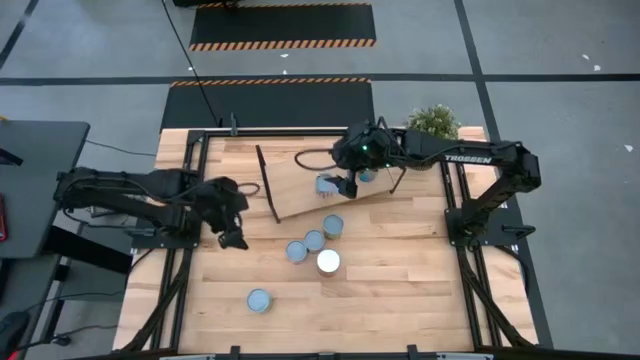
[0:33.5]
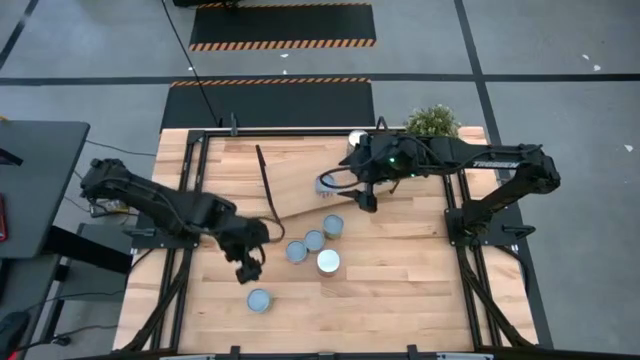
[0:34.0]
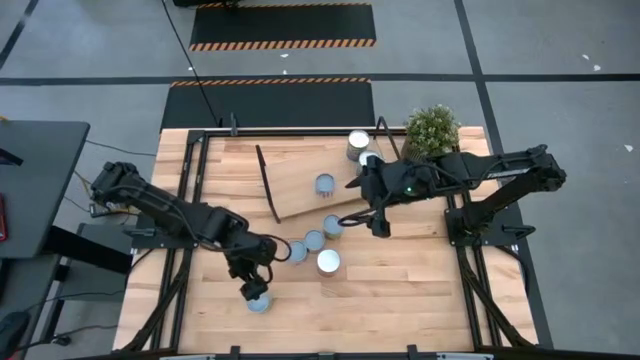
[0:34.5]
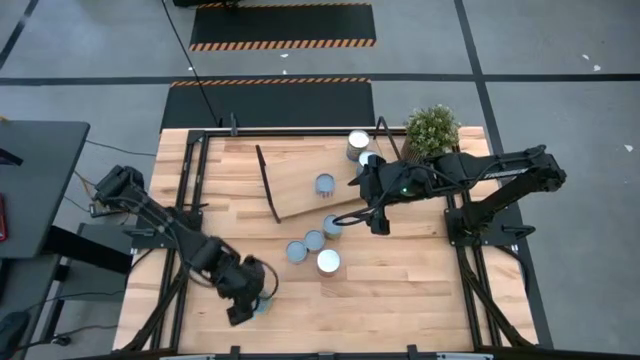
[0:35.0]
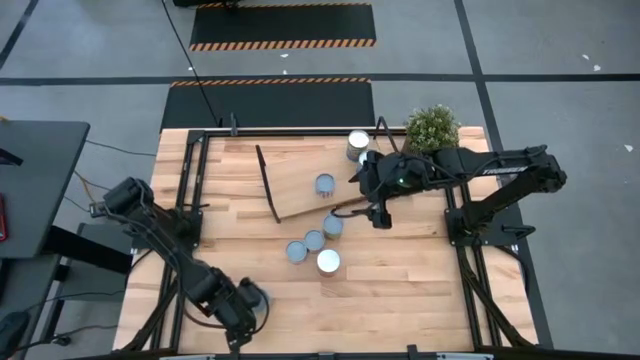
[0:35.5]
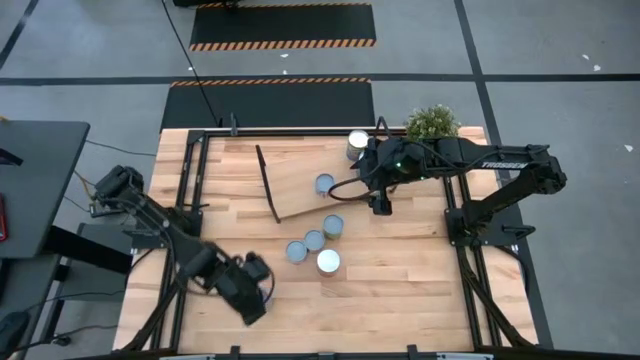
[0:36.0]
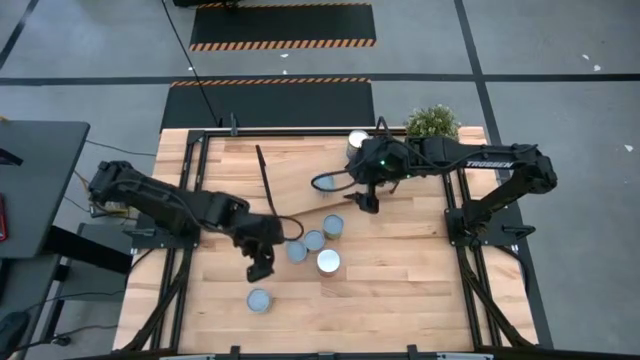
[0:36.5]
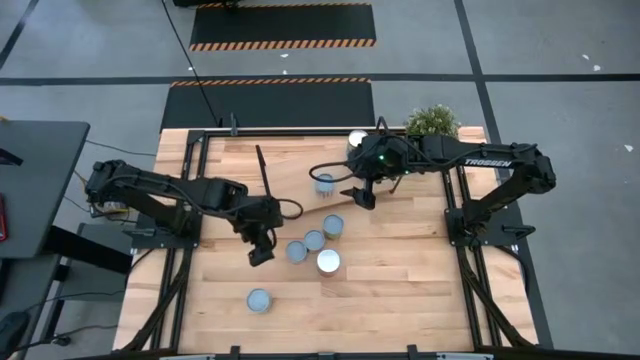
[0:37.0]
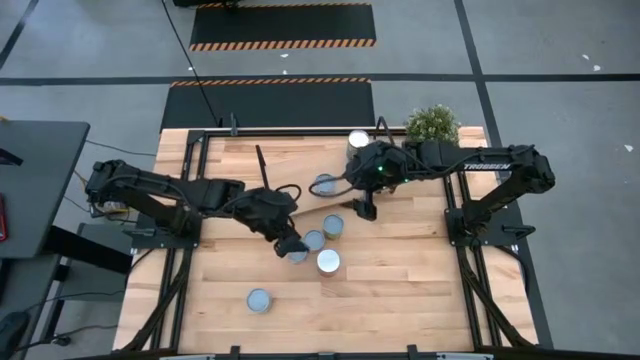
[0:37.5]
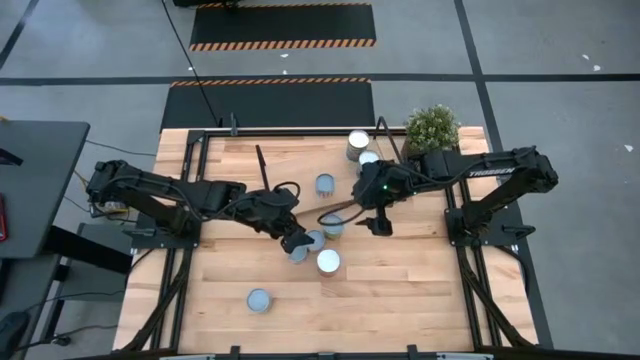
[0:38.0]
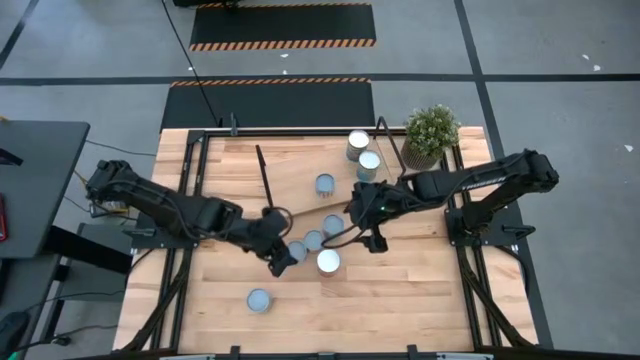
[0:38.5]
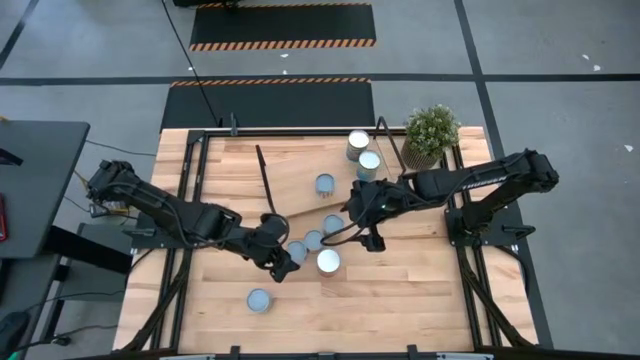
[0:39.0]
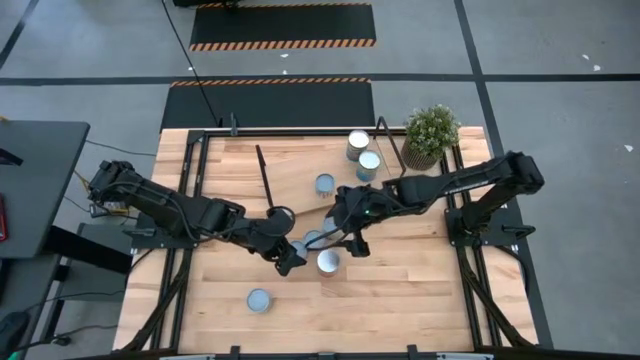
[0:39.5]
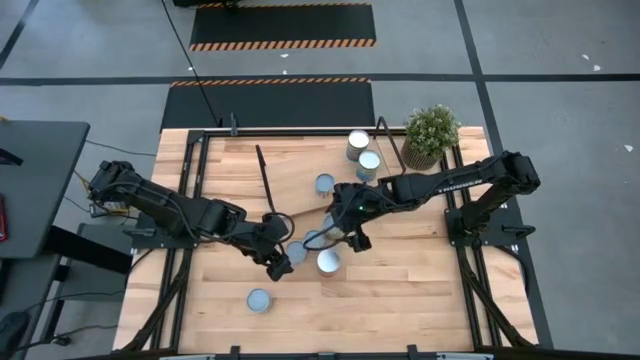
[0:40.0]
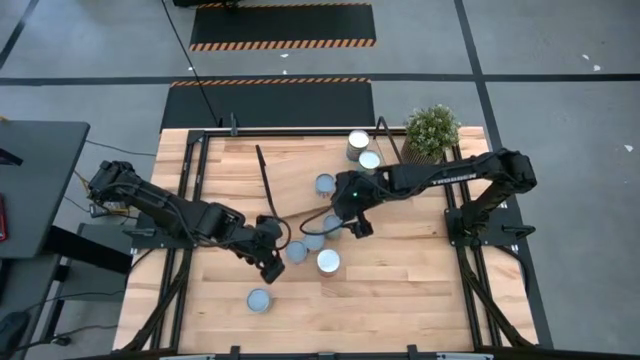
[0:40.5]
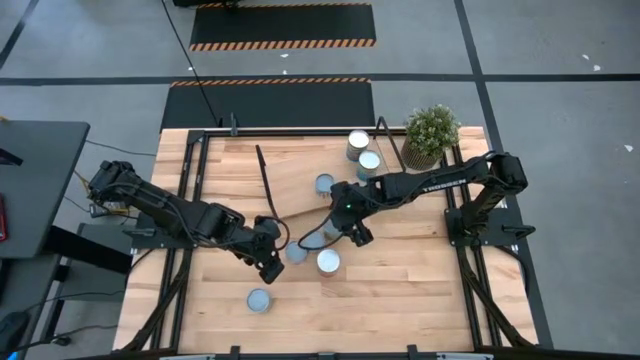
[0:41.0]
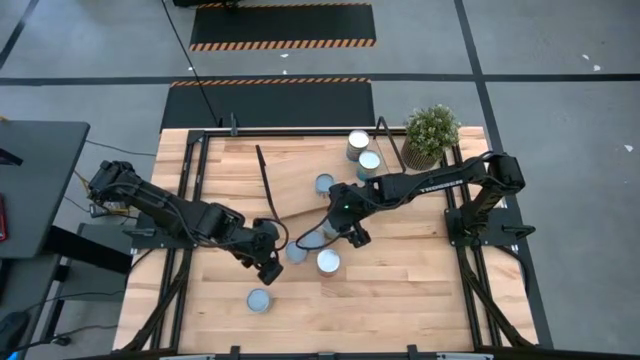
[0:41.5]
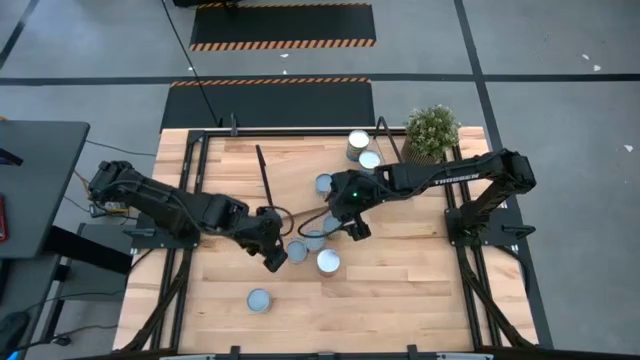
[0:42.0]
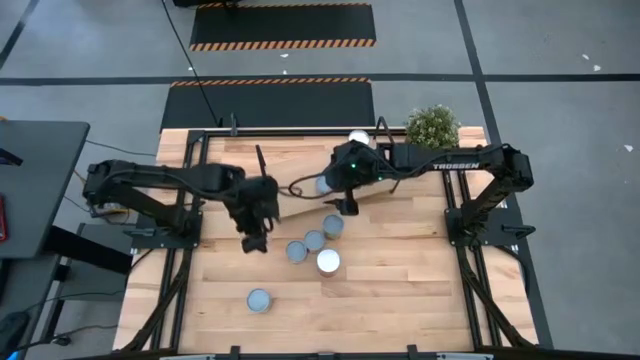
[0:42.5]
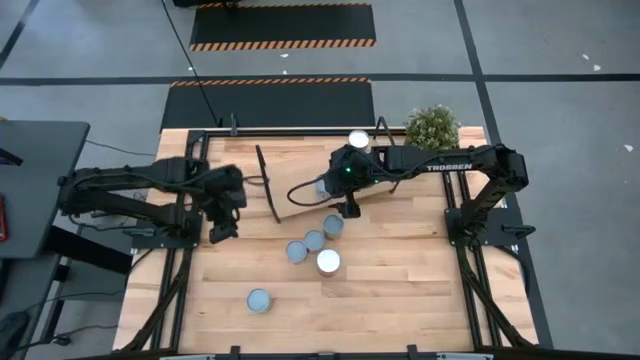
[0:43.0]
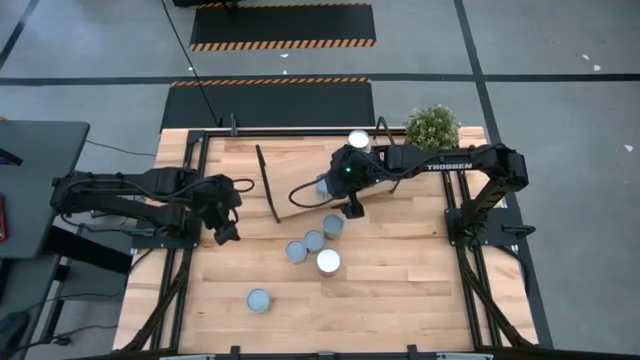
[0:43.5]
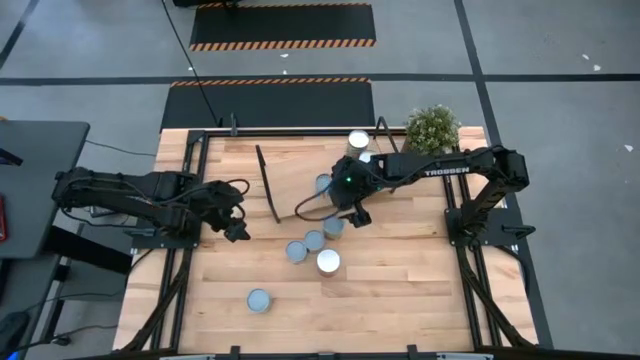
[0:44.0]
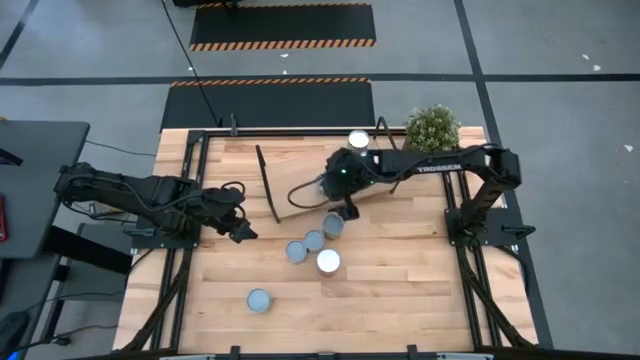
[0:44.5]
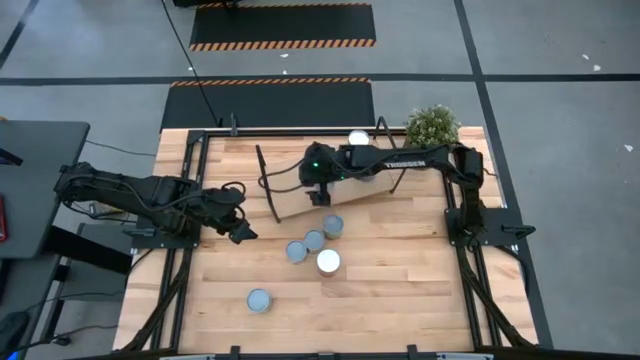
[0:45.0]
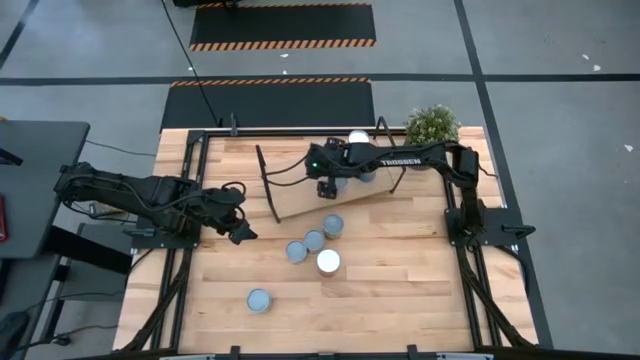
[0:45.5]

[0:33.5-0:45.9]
Task: Pick and place cans onto a shelf
Put the white can on the shelf

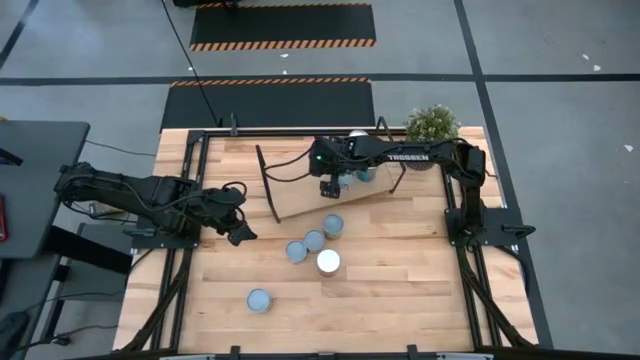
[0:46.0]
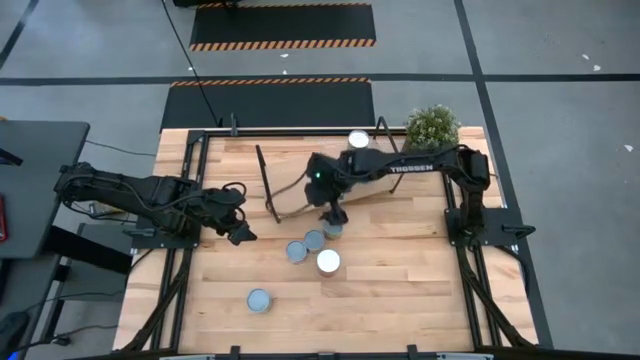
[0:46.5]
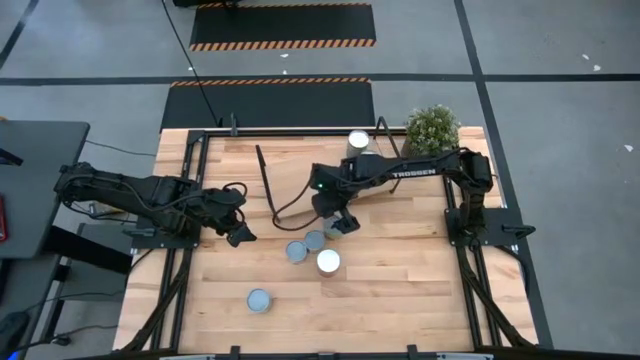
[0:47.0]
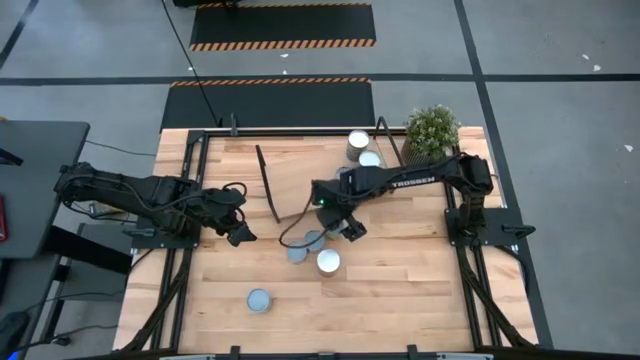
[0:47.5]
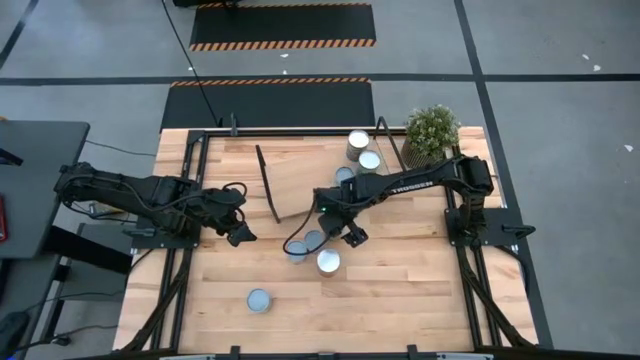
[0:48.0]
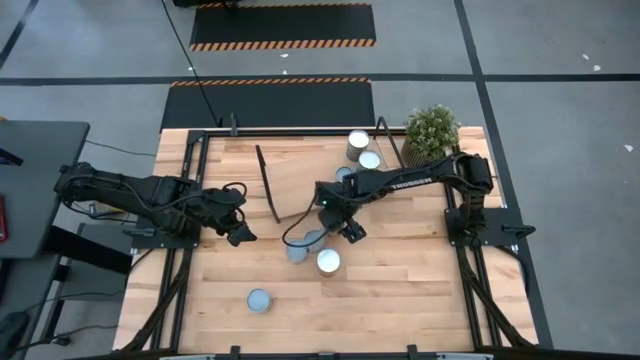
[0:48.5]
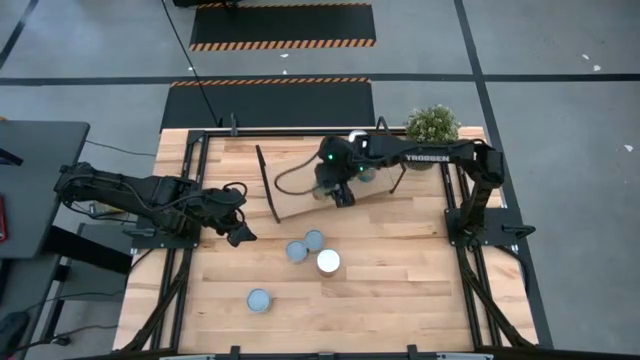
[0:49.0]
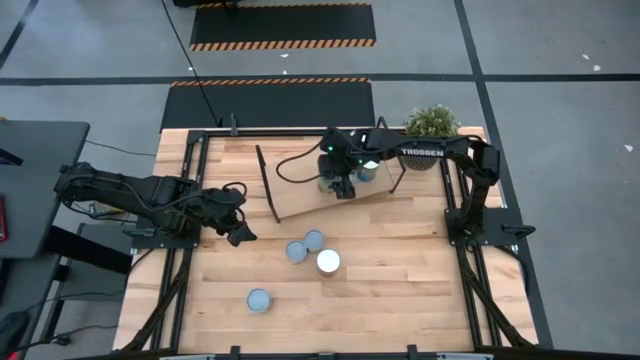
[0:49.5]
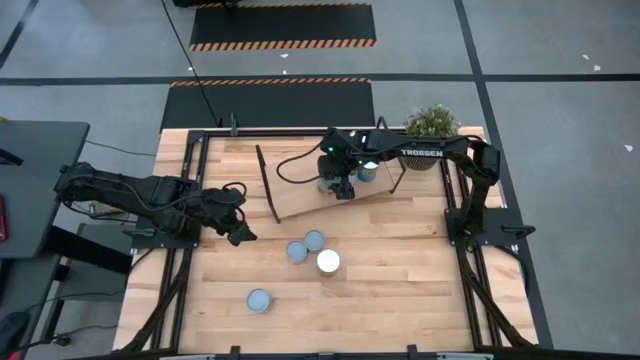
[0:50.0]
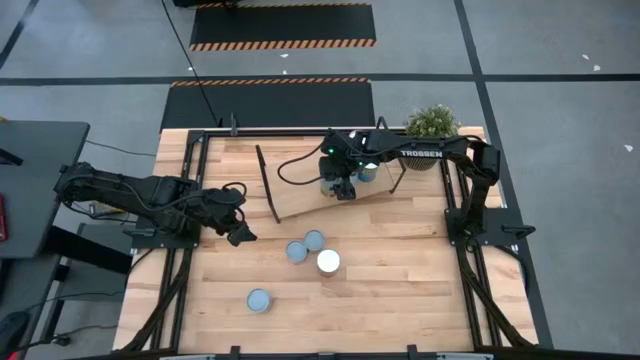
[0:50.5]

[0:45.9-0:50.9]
Put the light green can on the shelf

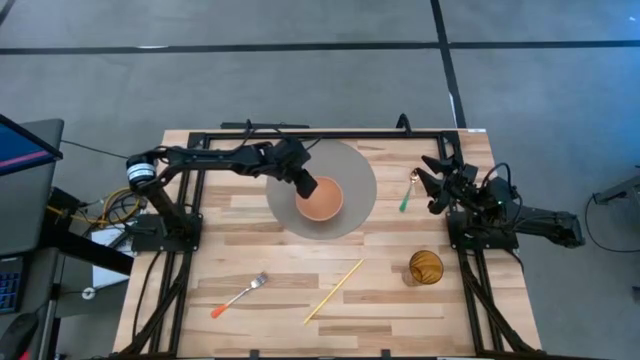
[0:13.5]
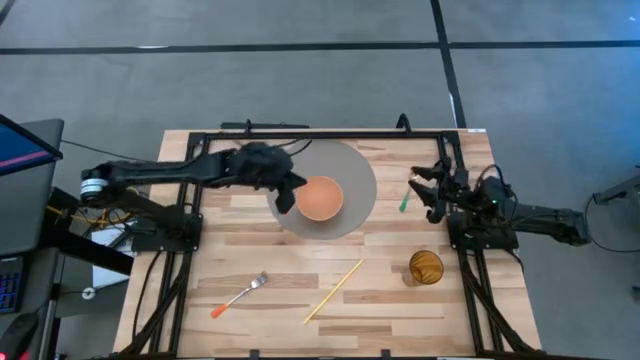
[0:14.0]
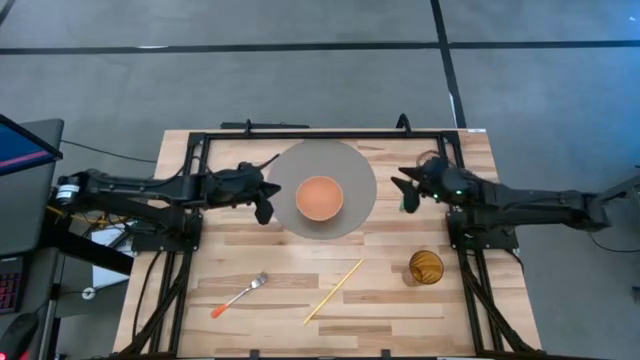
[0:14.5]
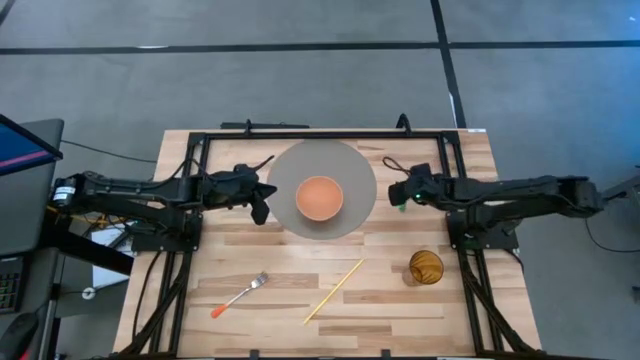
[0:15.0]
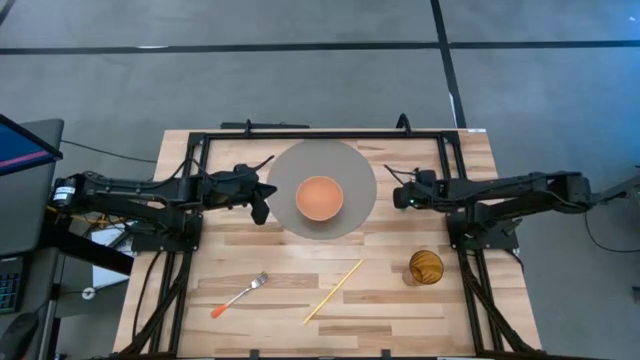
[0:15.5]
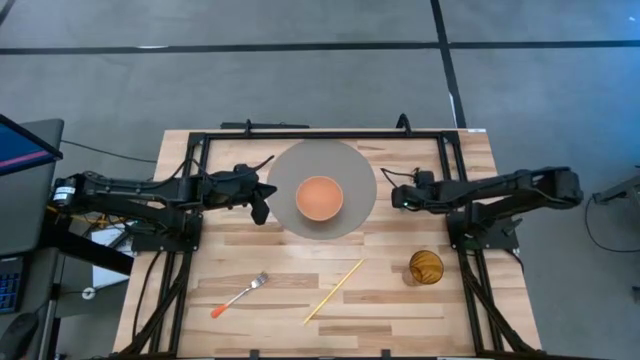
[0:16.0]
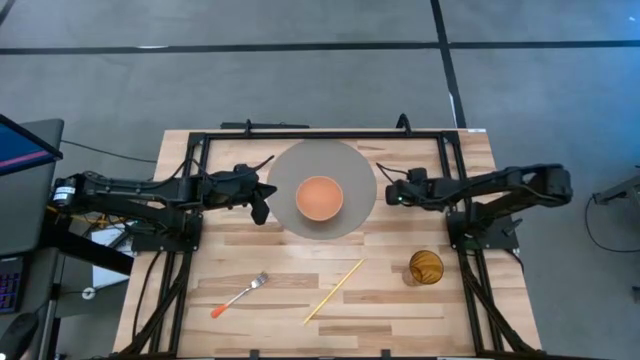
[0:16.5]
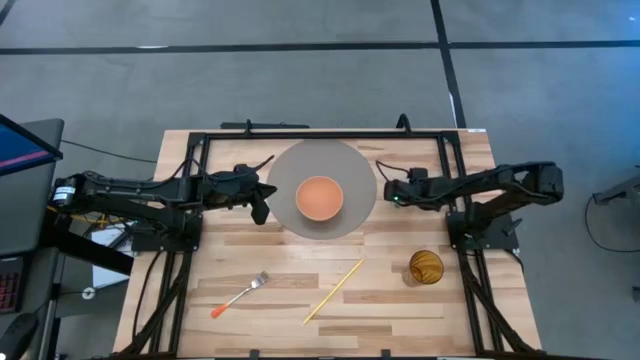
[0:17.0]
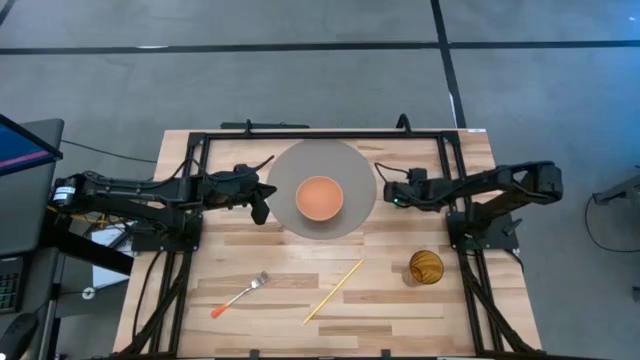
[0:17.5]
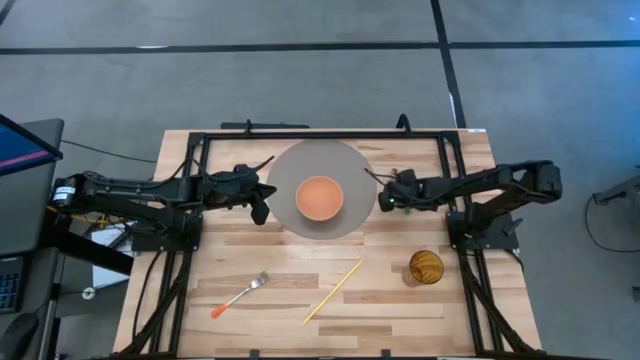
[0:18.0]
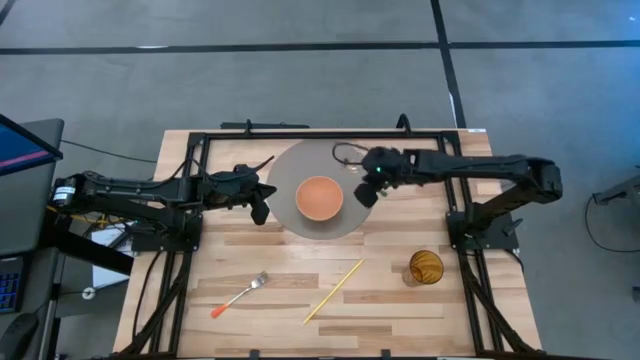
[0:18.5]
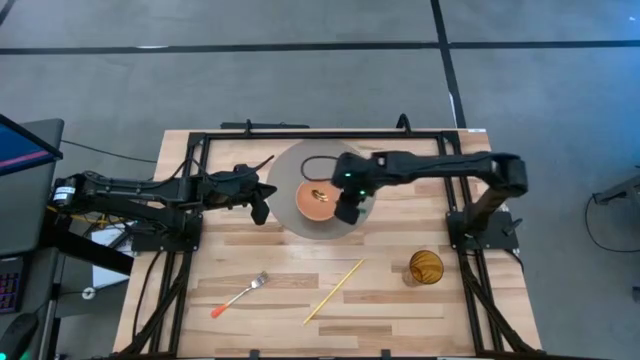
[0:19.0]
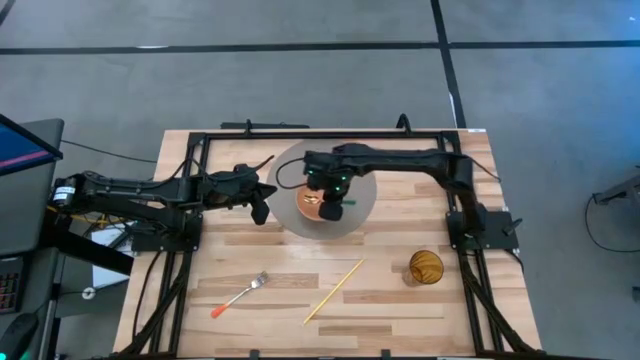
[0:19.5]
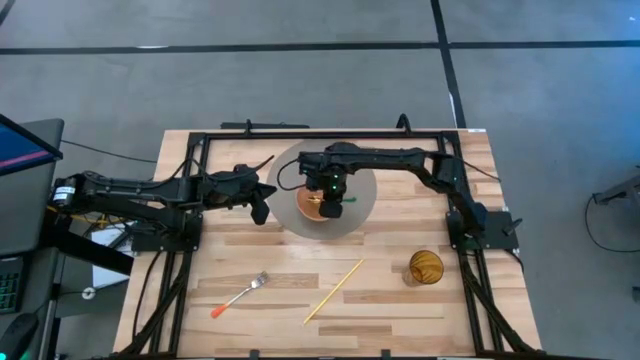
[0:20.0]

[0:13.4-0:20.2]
Task: Pick & Place Utensil
Put the green spoon into the orange bowl on the gray table placemat
